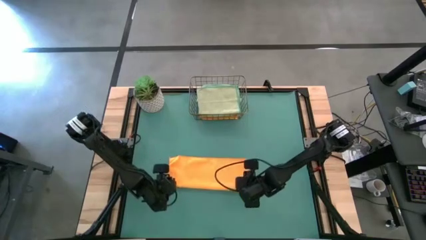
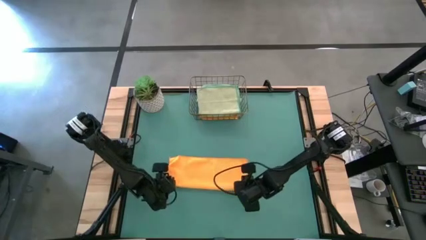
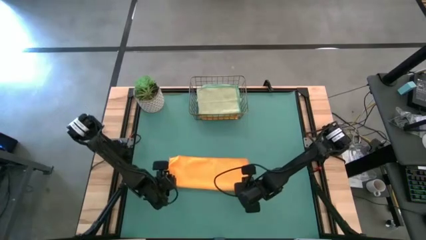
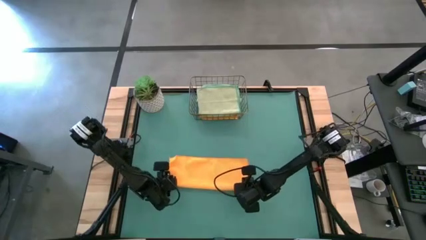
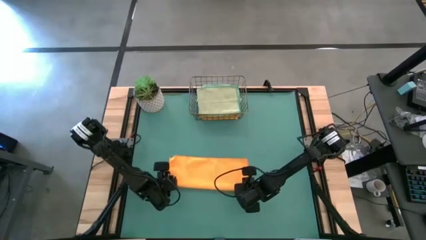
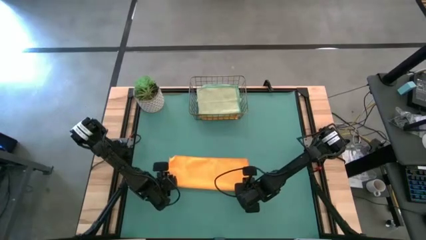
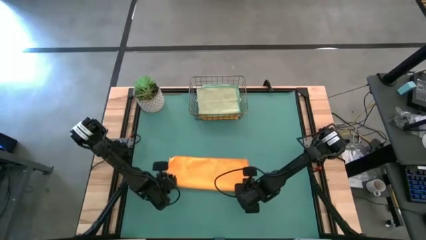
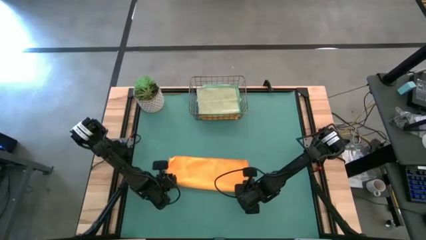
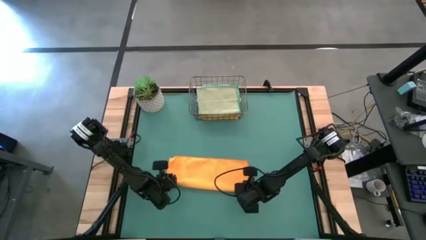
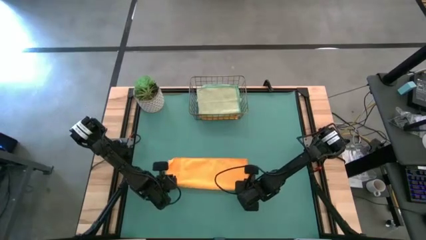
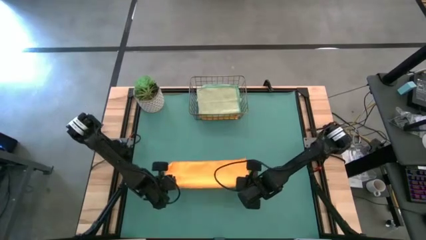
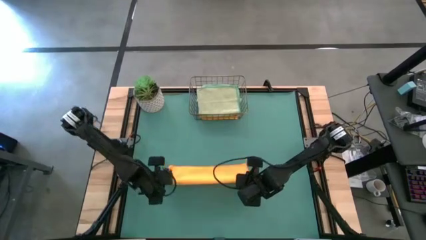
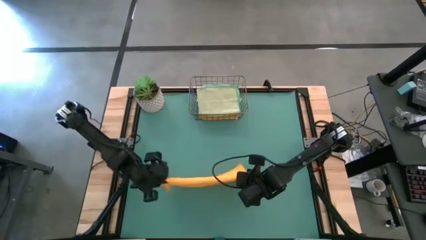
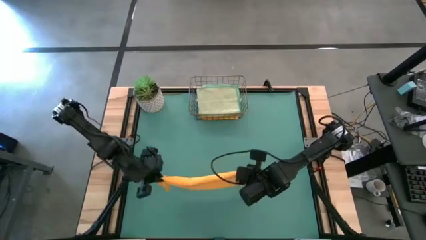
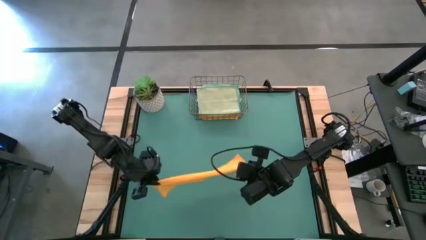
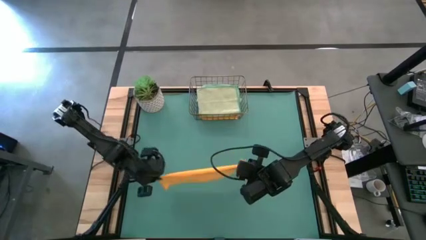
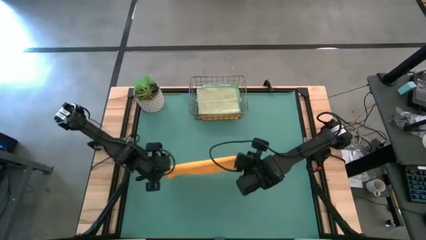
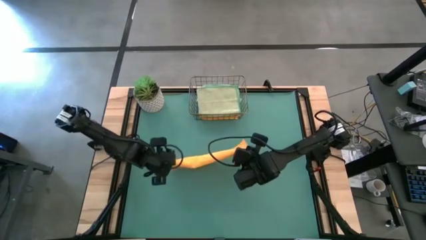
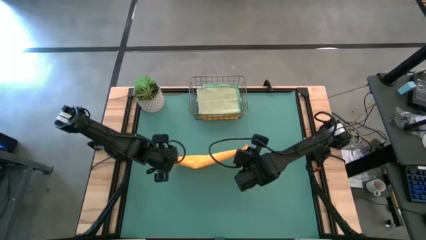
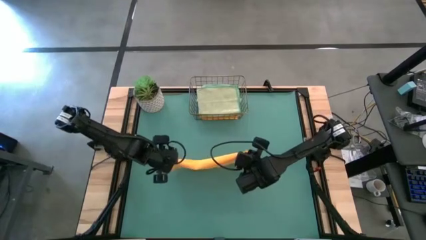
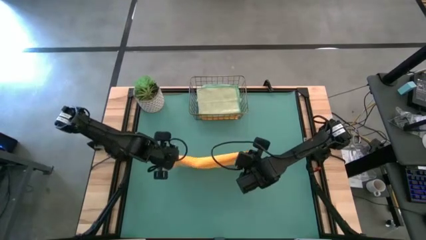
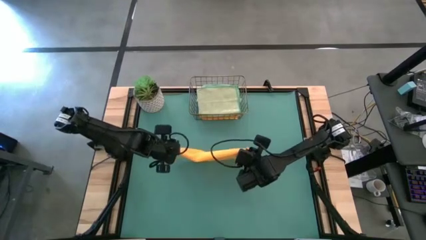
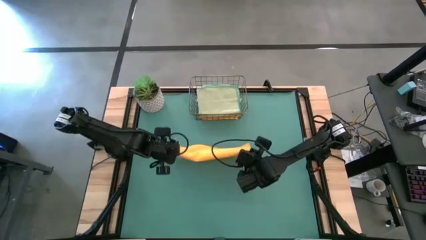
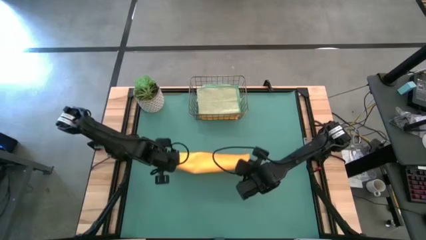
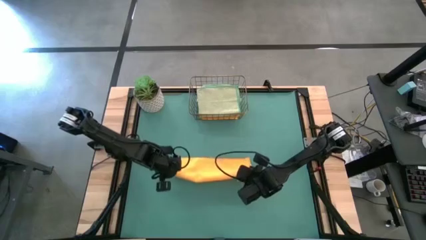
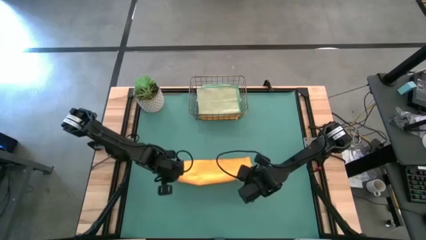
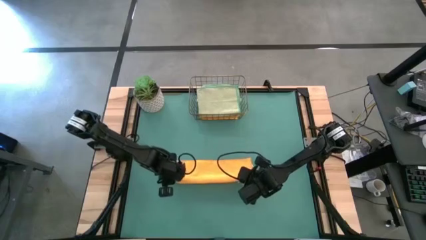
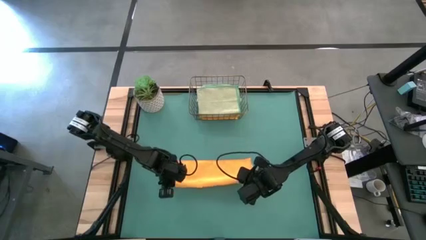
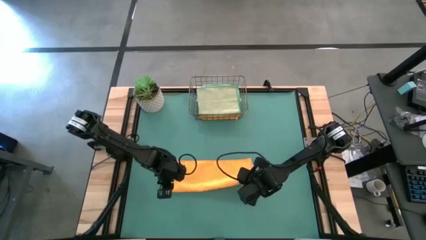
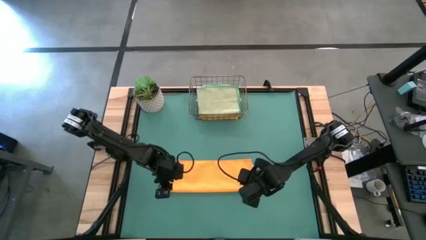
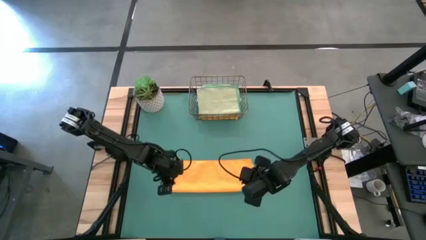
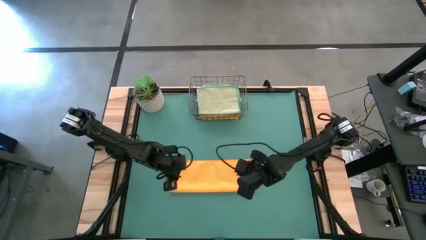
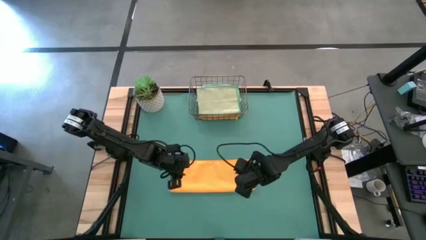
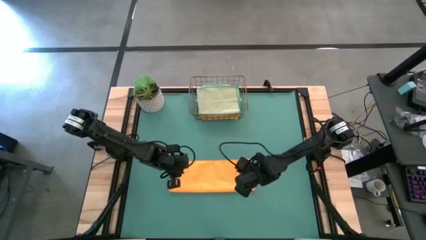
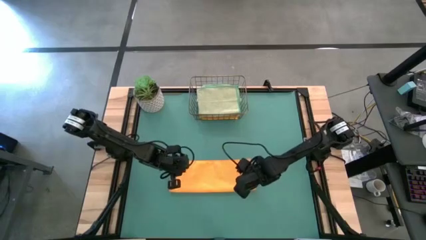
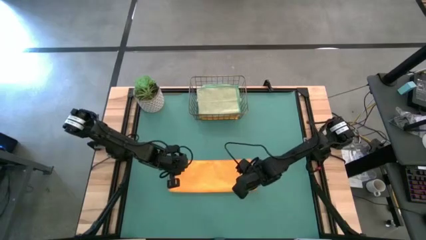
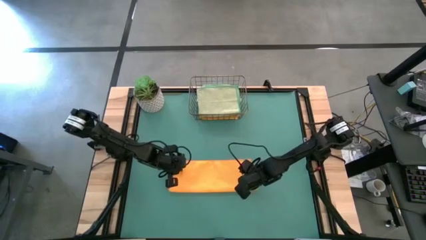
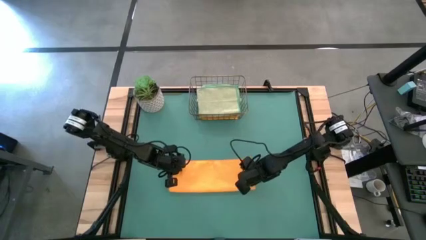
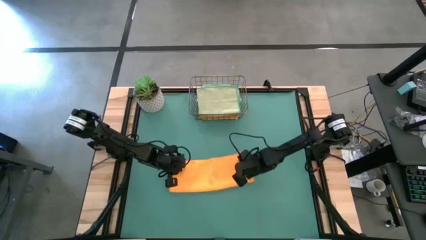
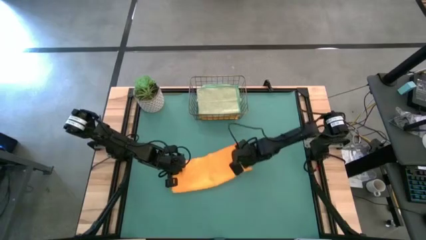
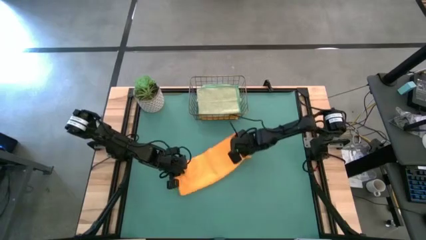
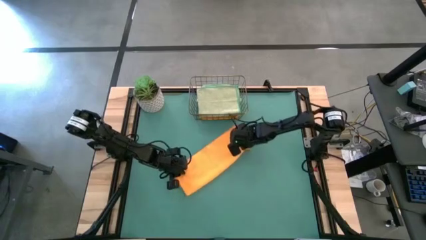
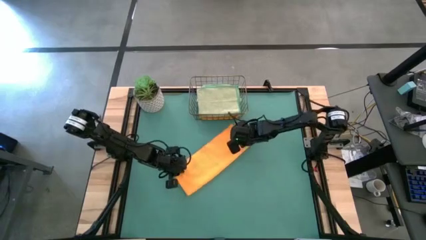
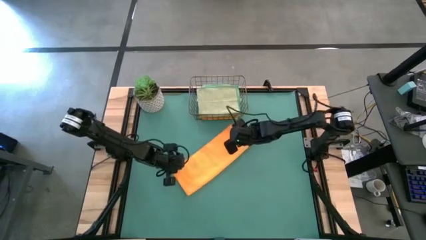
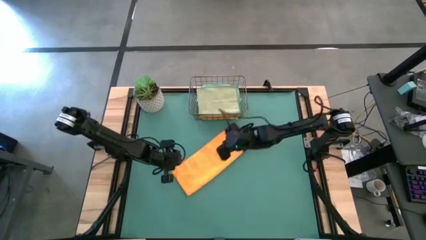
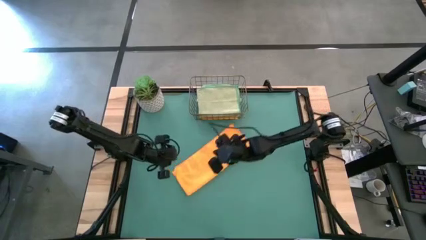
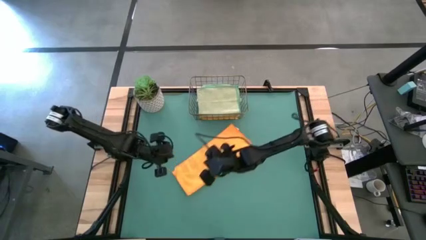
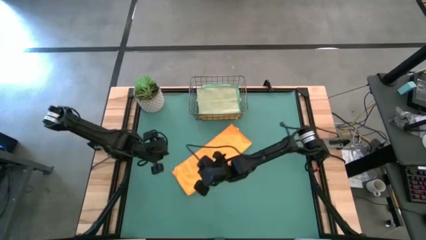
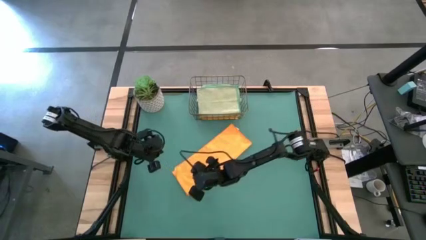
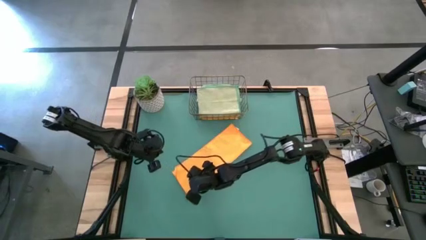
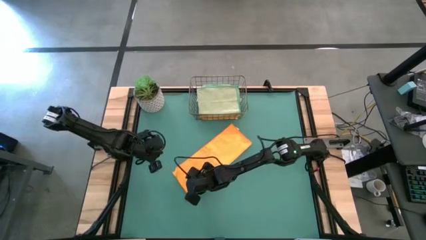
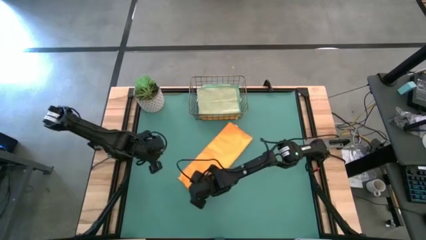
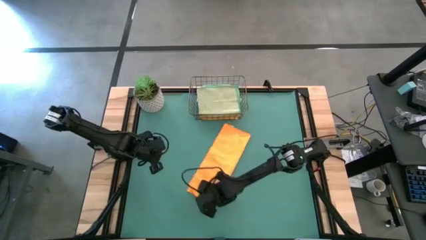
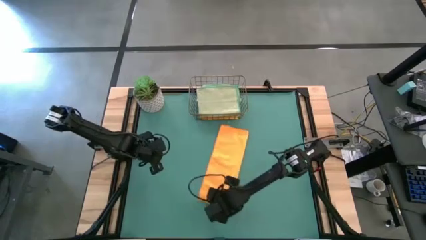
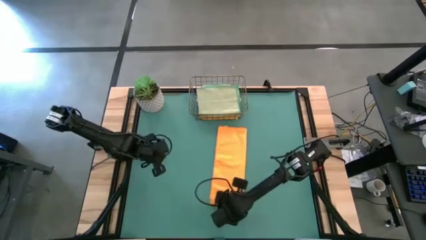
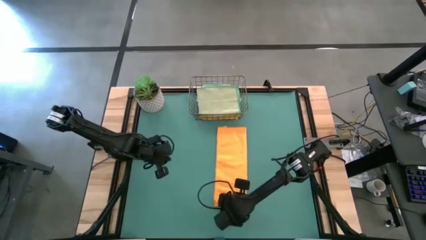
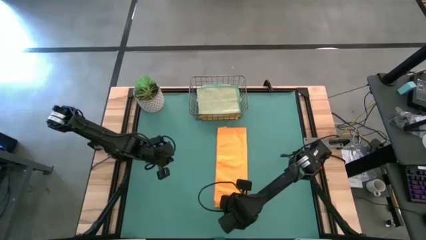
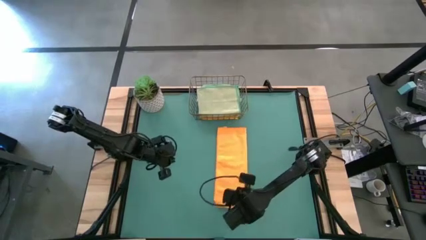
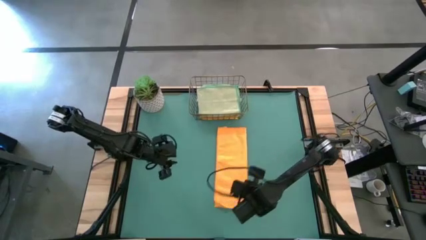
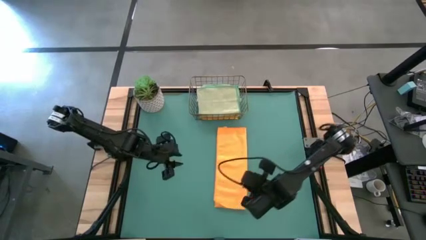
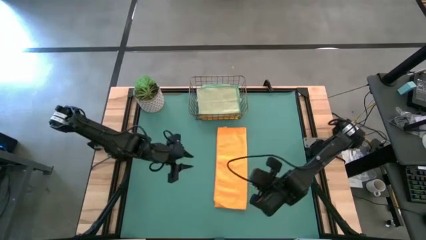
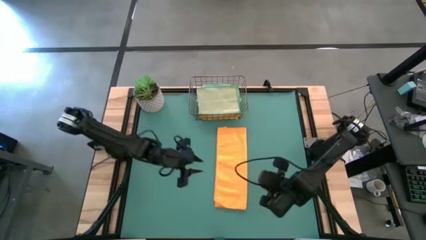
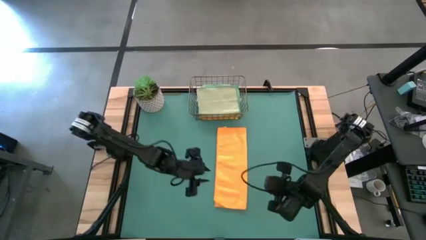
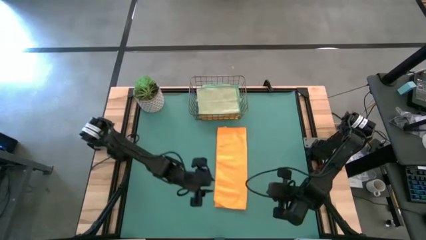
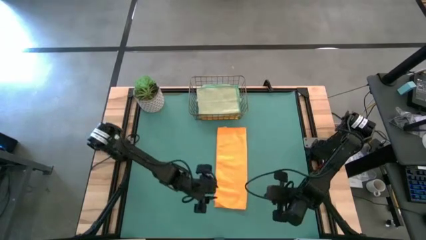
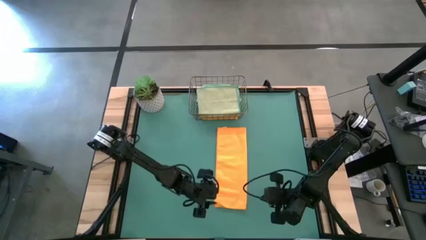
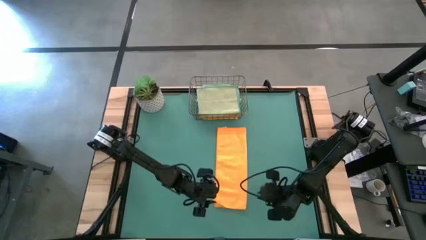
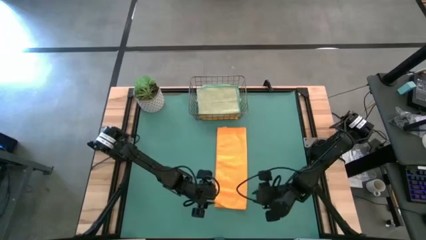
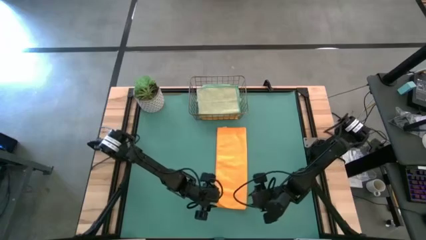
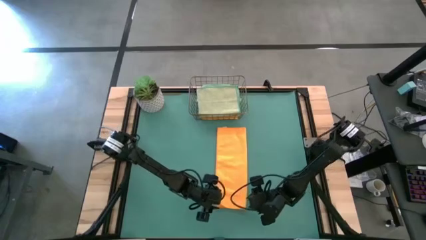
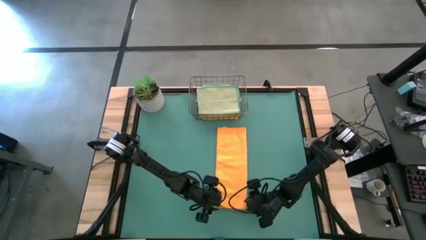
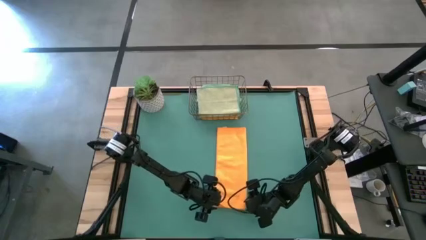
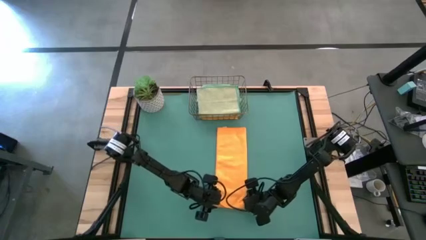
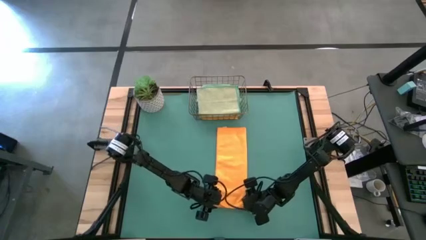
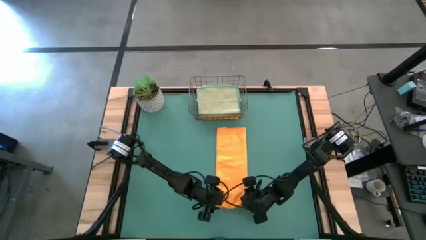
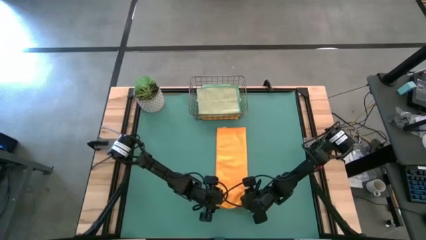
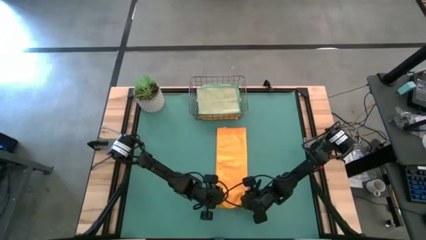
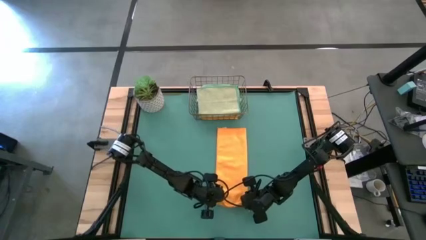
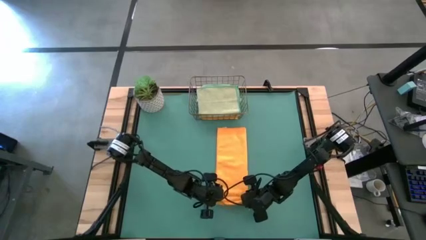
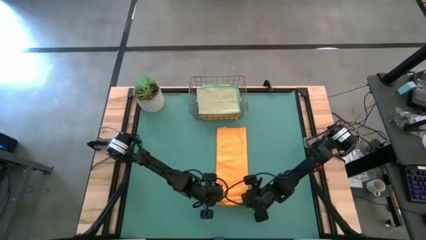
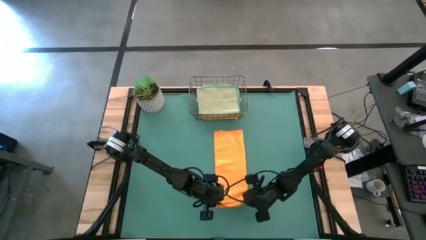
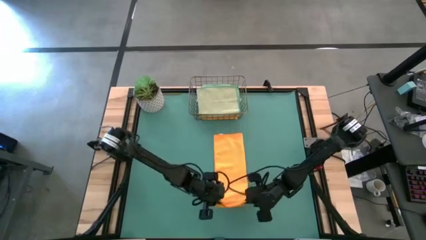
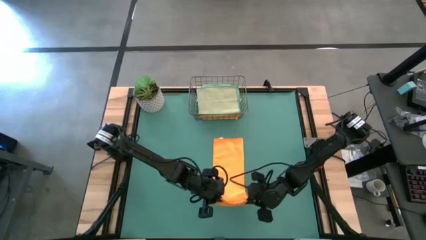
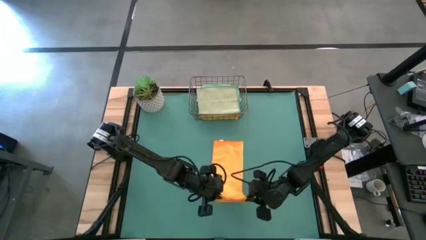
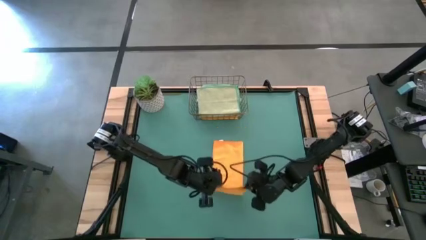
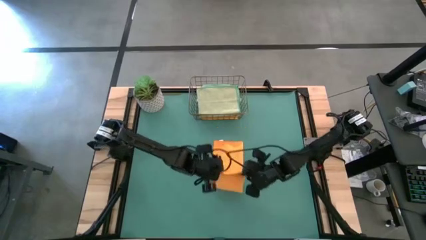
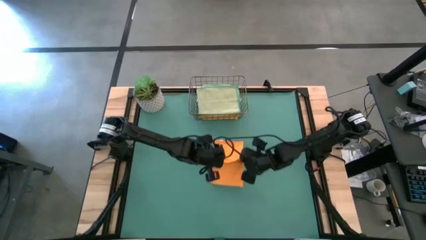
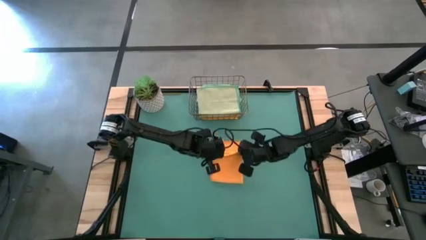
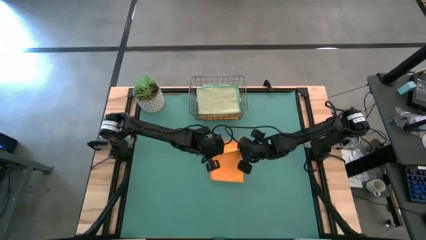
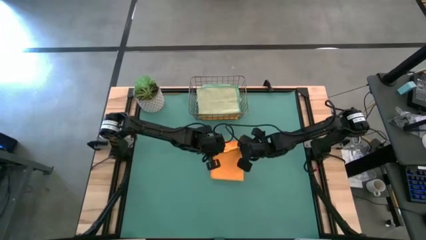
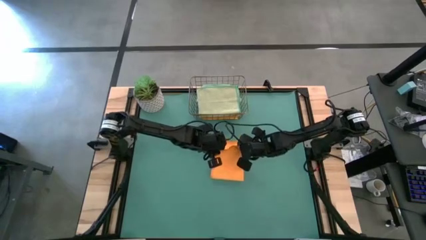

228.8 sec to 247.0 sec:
Task: Fold microfiber towels
Fold the orange microfiber cloth
